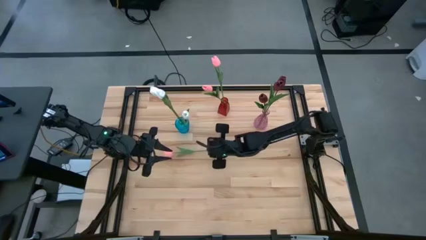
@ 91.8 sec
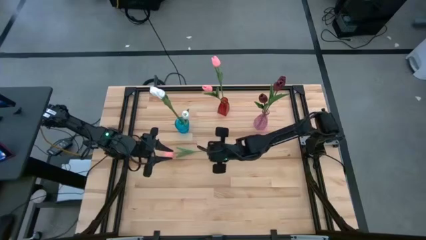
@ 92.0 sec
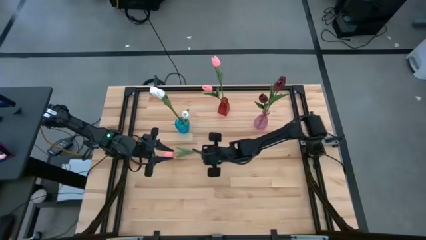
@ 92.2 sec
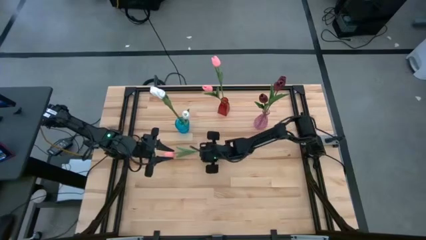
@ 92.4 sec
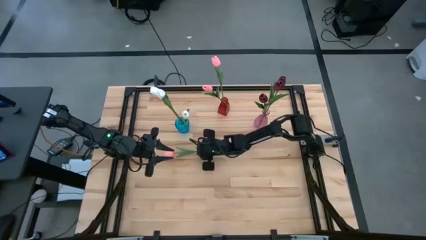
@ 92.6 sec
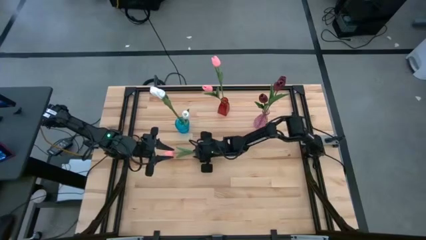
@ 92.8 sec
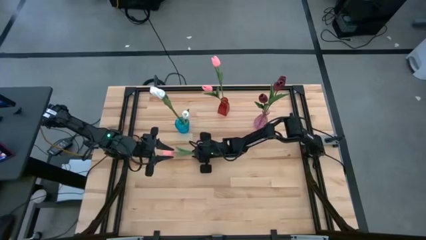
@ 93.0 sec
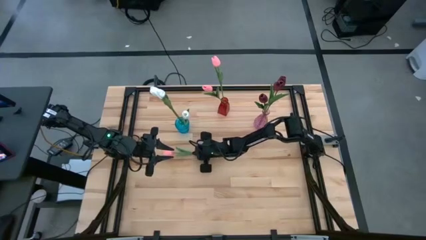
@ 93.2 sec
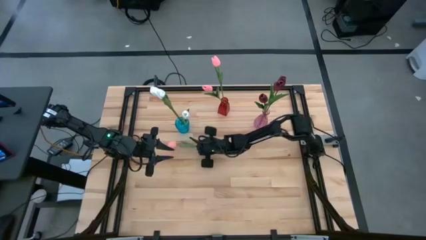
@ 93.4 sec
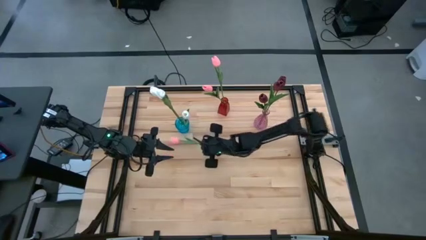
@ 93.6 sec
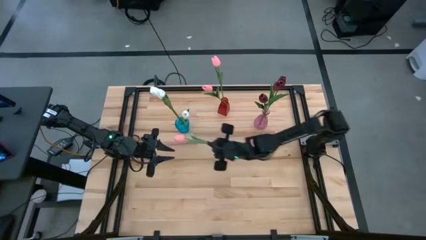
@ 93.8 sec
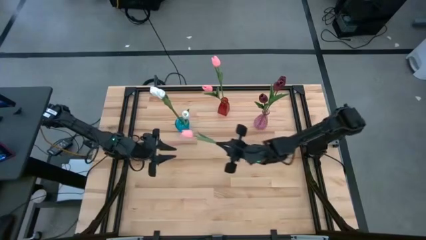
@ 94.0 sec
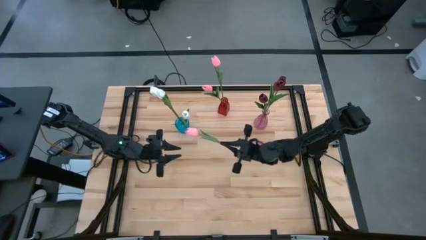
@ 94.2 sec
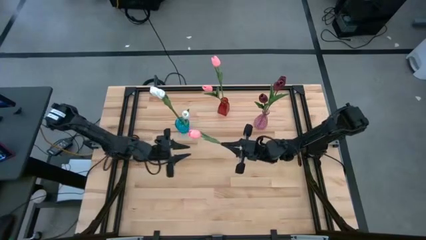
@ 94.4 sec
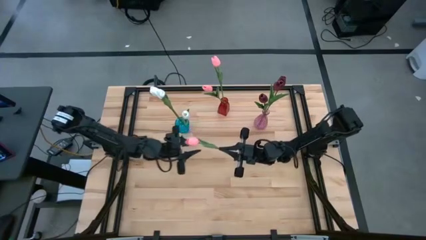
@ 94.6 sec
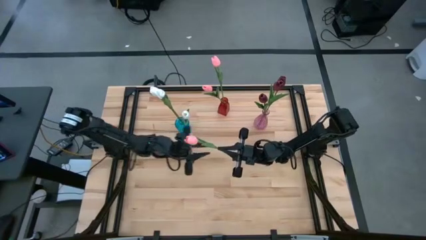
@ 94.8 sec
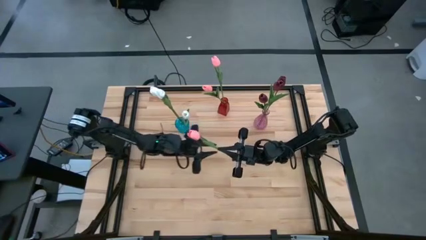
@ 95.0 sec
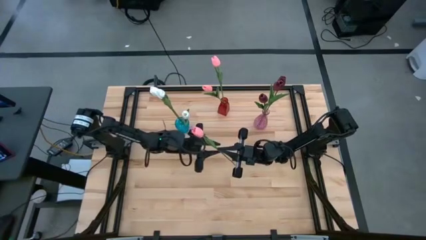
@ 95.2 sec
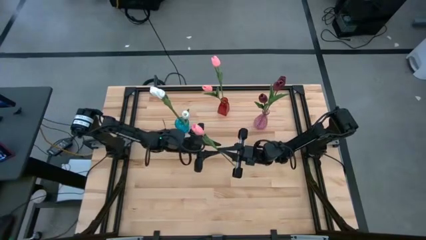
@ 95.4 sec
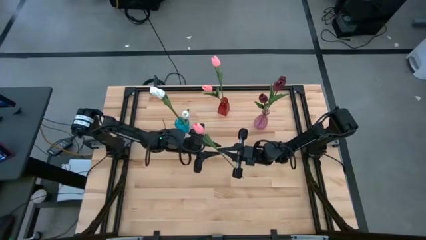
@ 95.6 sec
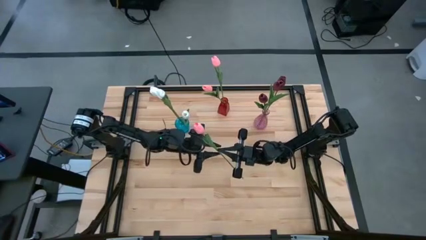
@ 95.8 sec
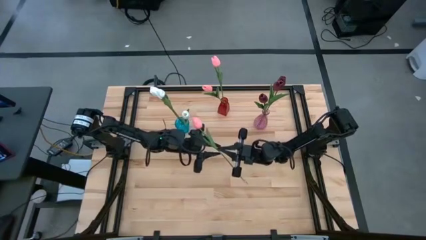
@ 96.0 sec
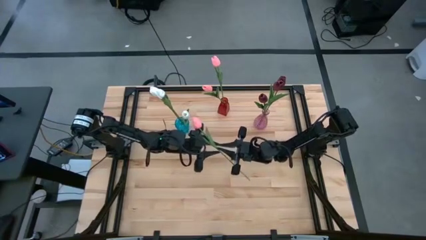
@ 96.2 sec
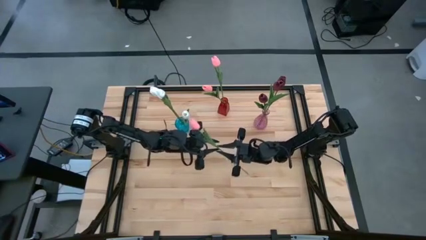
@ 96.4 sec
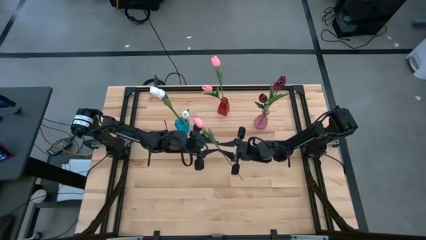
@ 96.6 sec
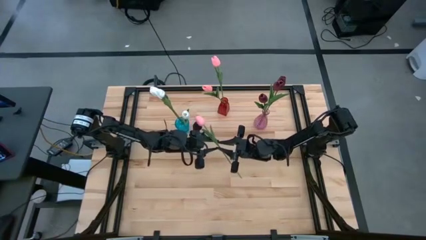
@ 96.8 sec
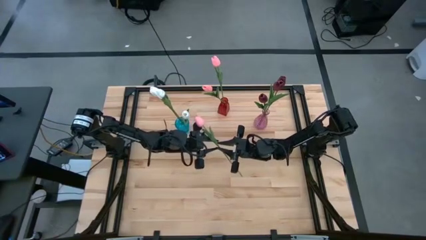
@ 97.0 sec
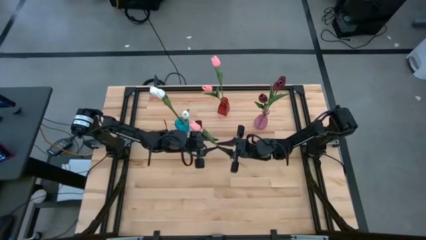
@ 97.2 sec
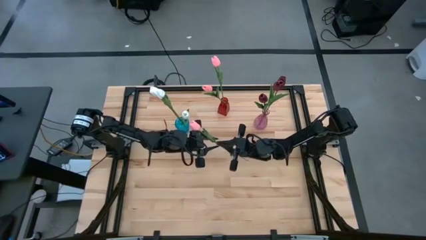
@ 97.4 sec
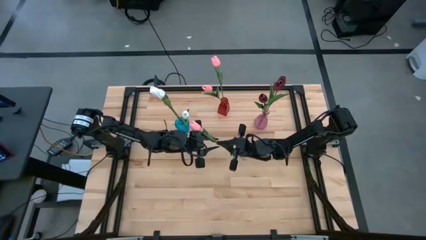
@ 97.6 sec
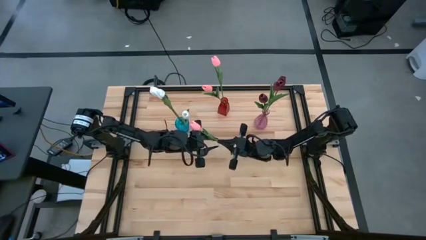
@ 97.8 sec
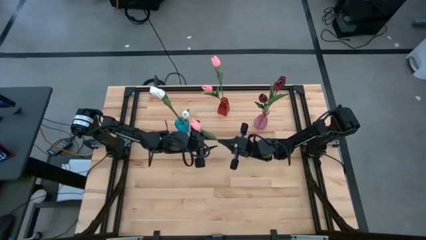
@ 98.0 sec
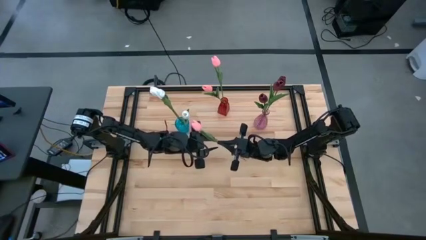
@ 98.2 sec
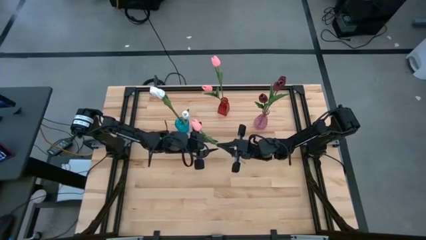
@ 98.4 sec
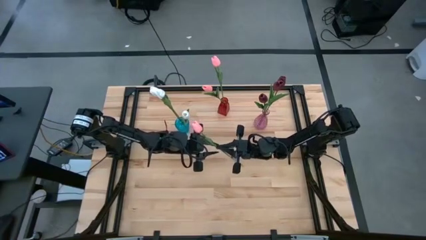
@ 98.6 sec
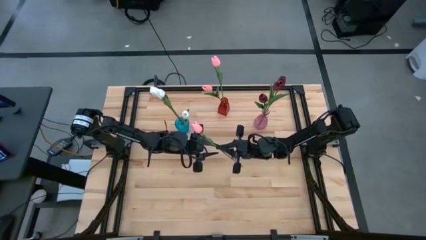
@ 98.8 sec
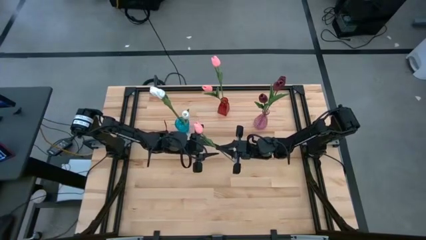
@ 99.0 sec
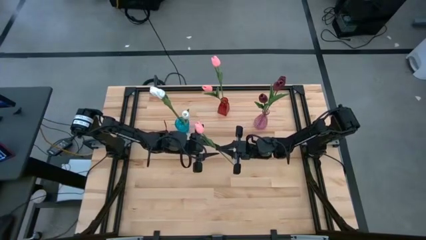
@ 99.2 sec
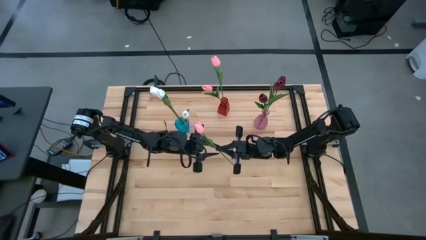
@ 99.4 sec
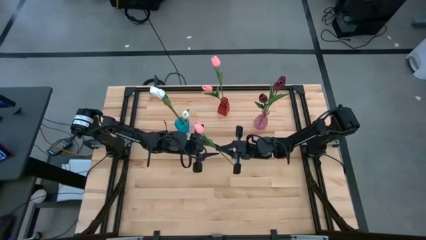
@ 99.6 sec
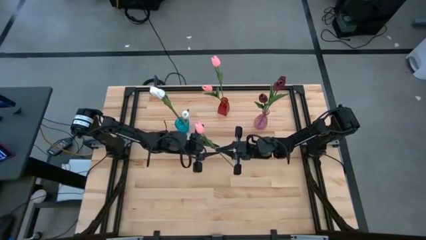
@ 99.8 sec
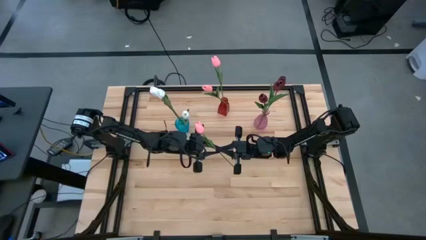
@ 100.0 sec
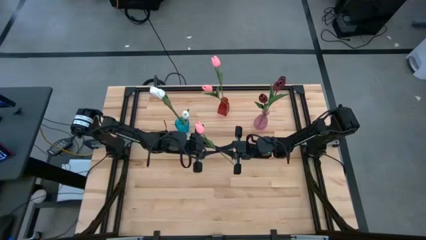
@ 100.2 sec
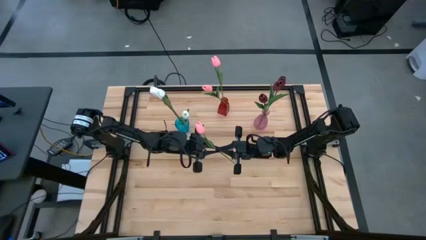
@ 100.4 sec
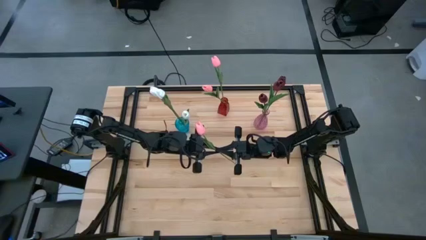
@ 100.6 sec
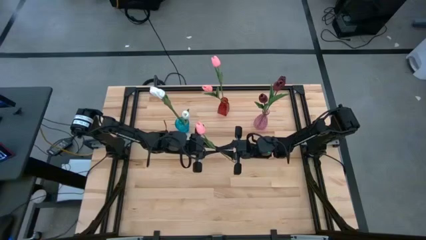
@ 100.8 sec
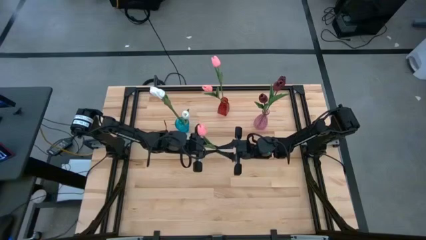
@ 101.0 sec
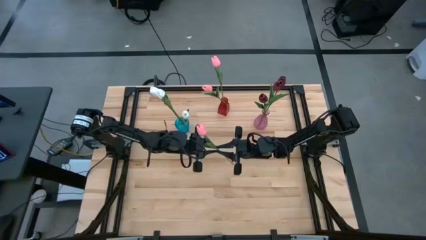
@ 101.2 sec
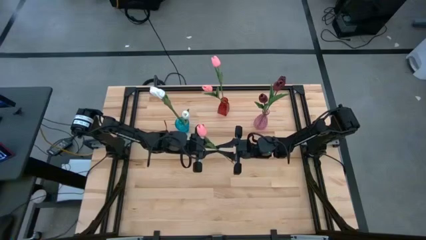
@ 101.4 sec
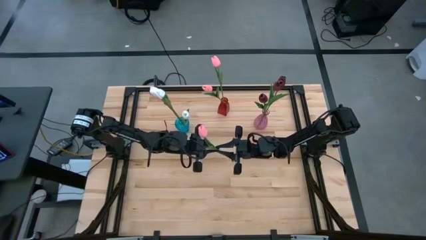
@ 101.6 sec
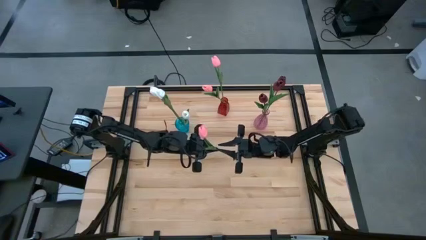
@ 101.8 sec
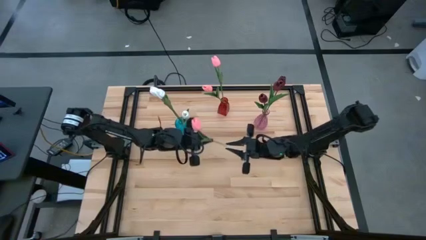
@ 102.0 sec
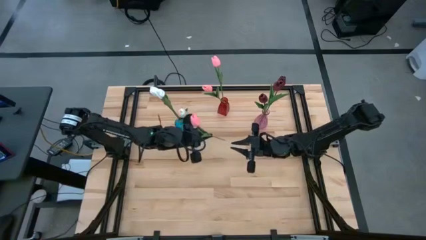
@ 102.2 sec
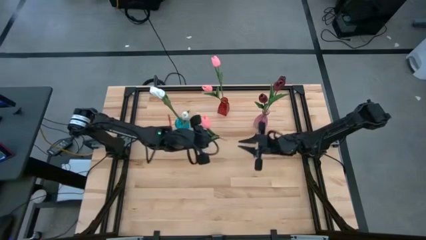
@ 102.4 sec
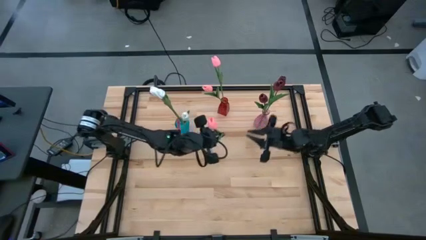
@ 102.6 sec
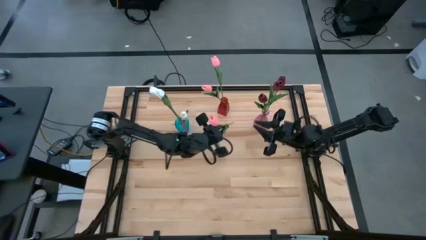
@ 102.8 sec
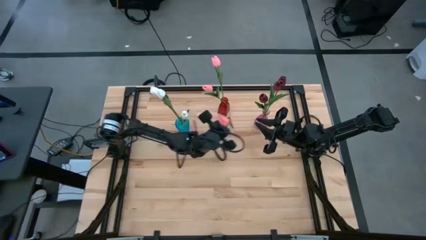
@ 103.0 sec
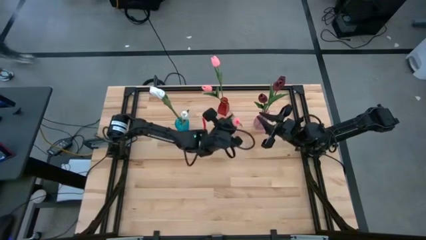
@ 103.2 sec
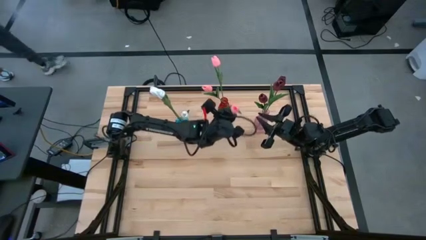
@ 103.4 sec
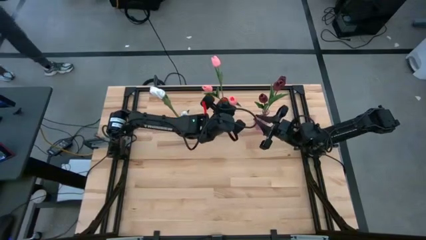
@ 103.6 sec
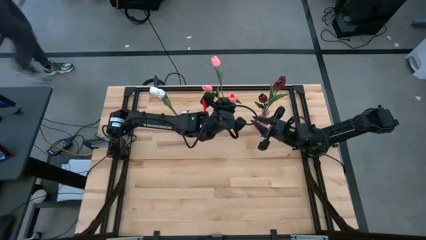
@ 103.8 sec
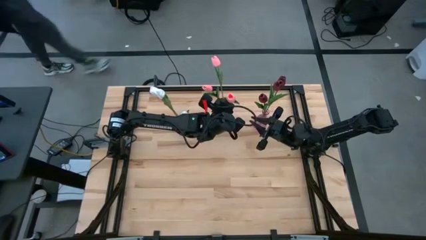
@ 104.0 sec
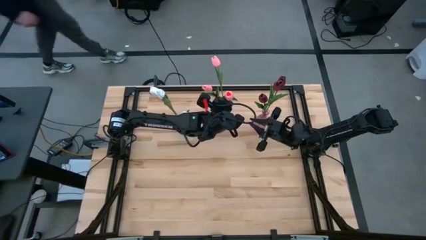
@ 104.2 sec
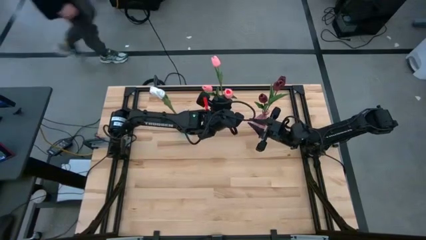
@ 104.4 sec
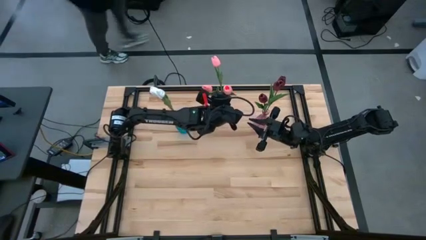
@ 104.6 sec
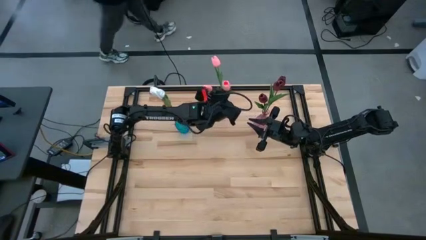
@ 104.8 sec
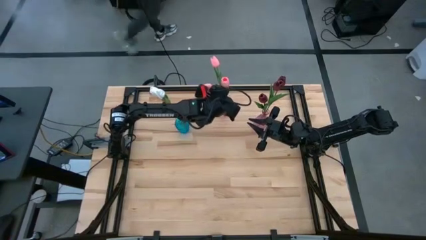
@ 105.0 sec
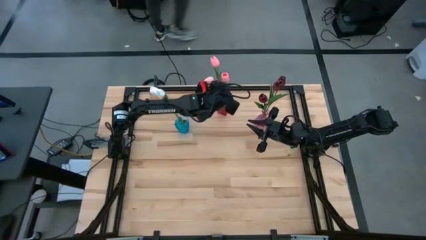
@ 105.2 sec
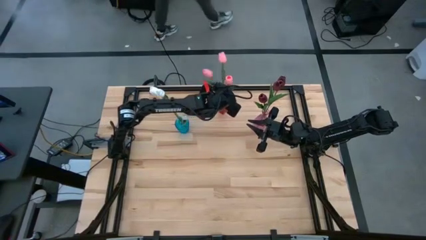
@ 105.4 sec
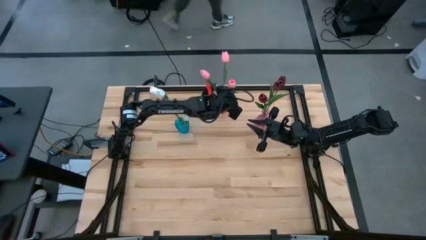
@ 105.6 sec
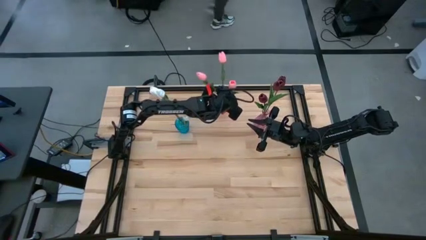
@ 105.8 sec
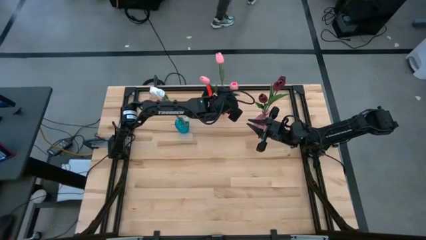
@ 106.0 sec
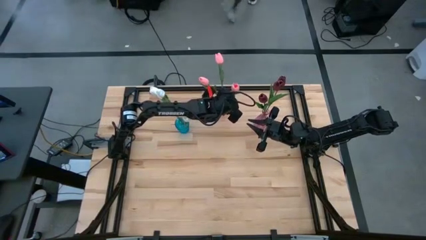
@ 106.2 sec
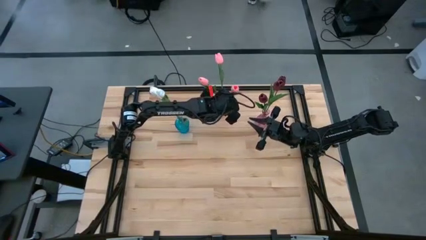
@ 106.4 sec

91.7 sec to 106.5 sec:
Task: Sort flowers into vase by color
Put the pink flower into the red vase
